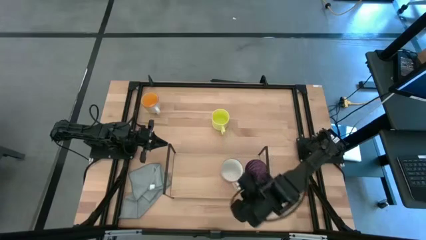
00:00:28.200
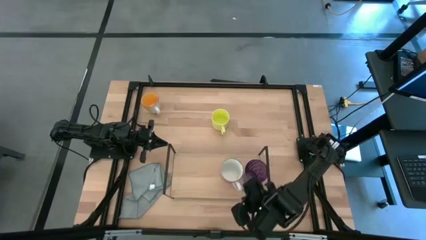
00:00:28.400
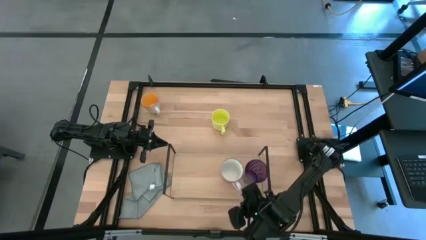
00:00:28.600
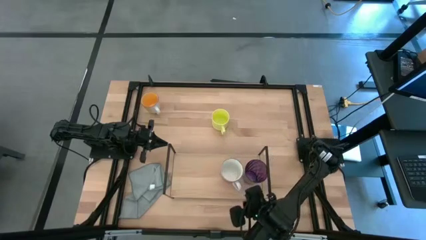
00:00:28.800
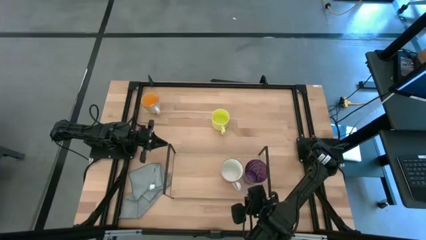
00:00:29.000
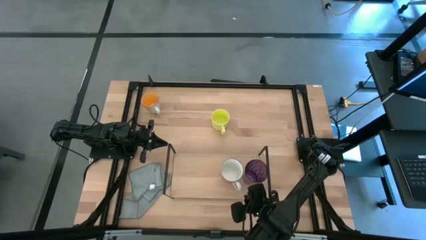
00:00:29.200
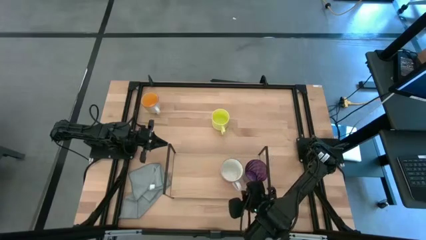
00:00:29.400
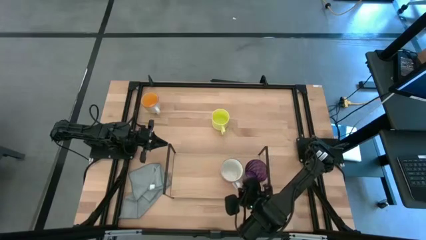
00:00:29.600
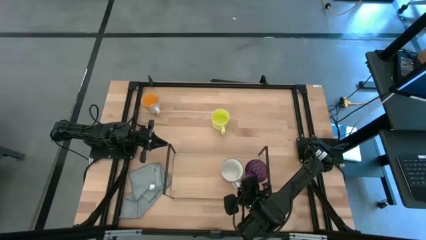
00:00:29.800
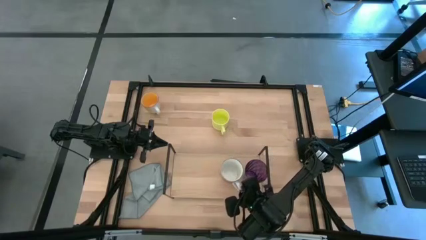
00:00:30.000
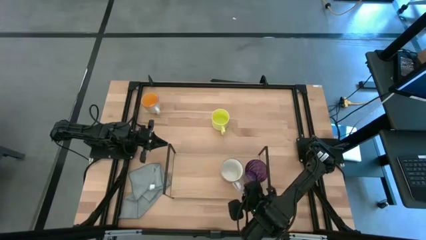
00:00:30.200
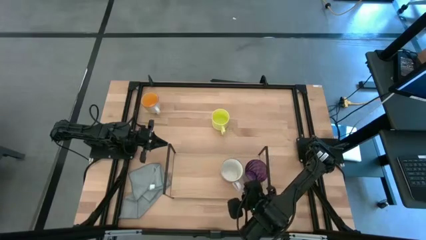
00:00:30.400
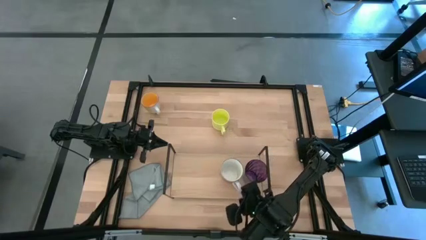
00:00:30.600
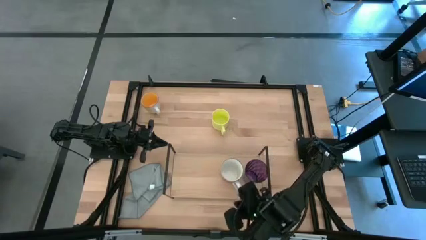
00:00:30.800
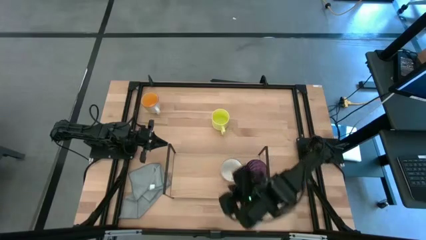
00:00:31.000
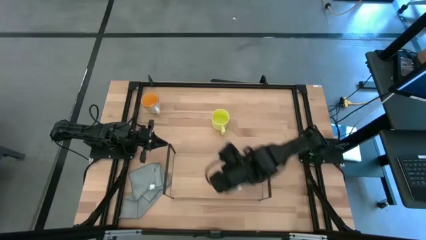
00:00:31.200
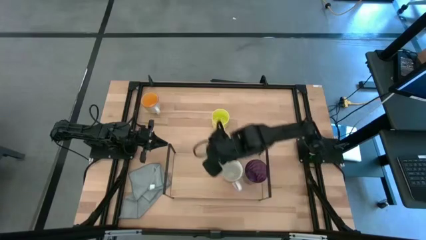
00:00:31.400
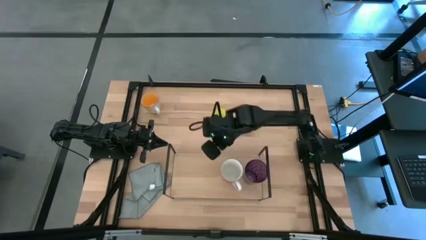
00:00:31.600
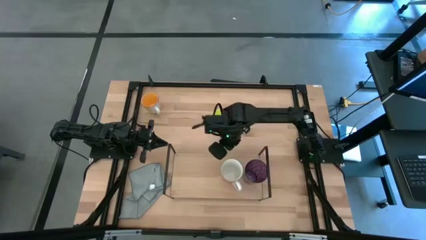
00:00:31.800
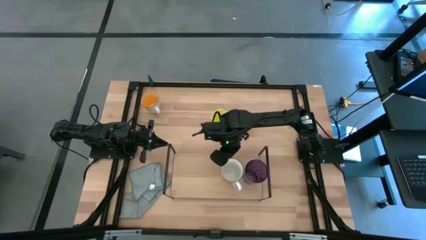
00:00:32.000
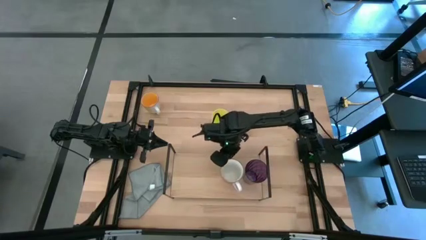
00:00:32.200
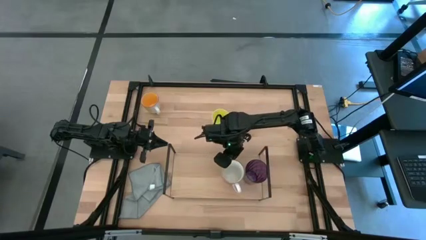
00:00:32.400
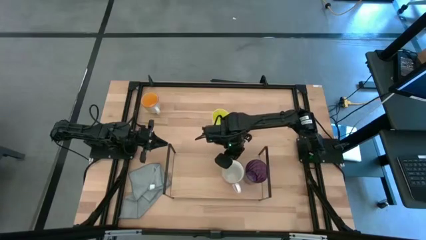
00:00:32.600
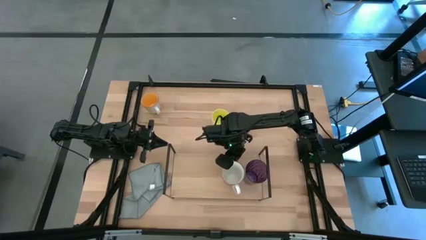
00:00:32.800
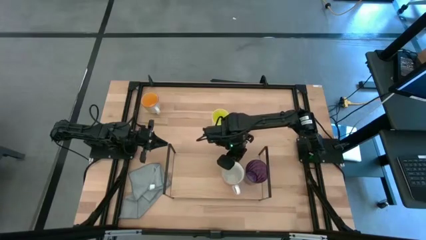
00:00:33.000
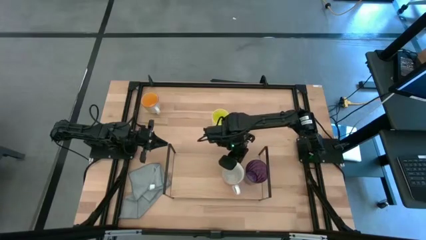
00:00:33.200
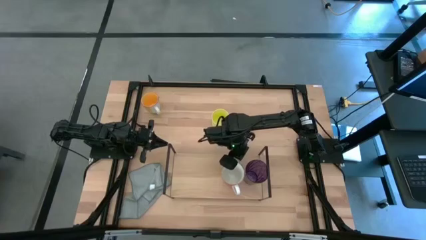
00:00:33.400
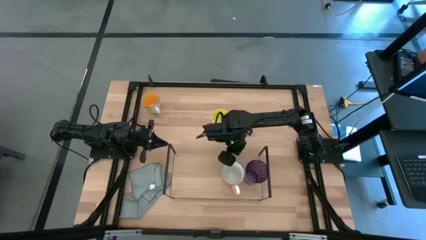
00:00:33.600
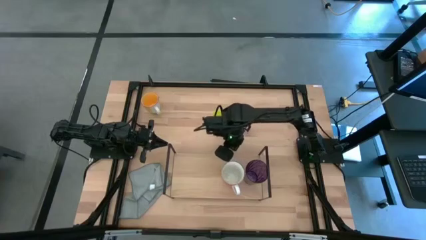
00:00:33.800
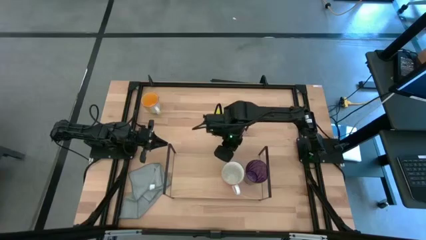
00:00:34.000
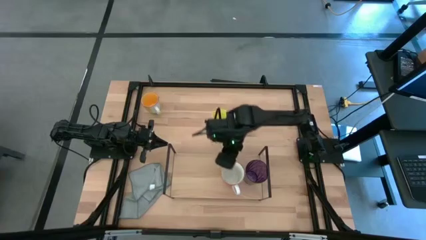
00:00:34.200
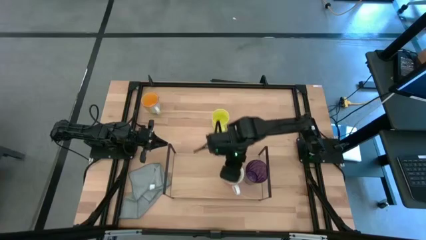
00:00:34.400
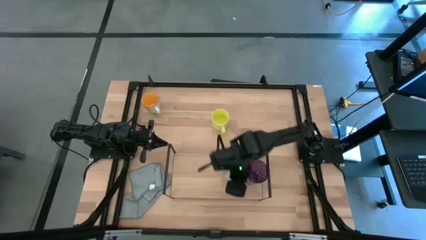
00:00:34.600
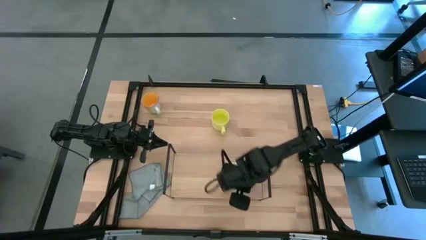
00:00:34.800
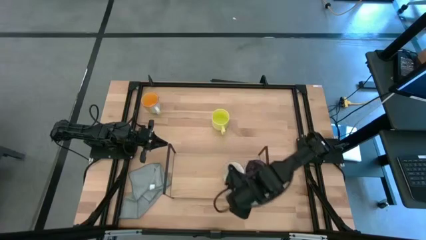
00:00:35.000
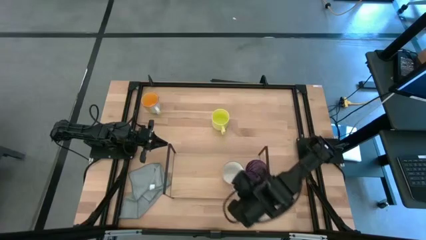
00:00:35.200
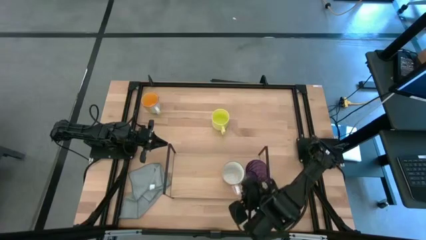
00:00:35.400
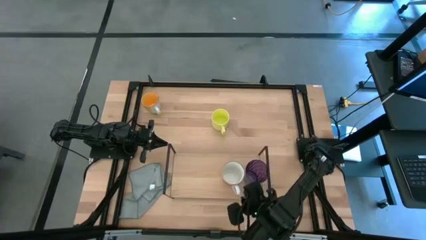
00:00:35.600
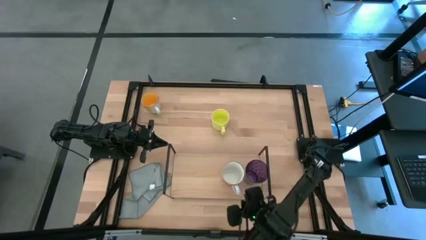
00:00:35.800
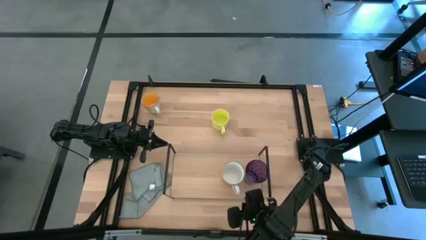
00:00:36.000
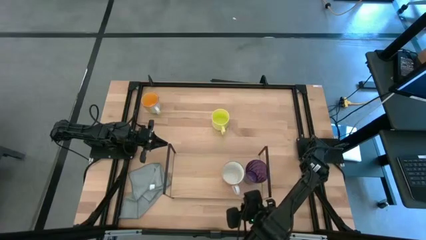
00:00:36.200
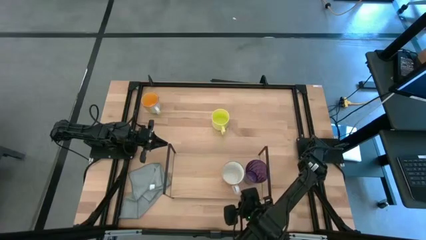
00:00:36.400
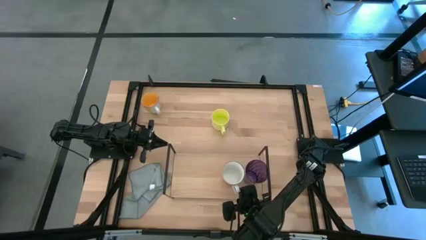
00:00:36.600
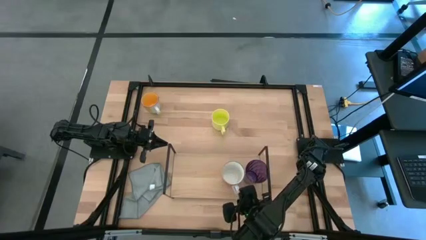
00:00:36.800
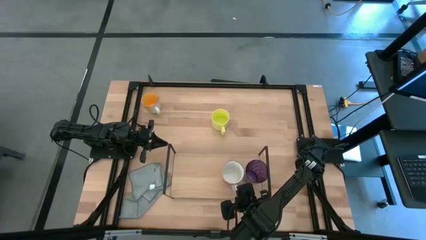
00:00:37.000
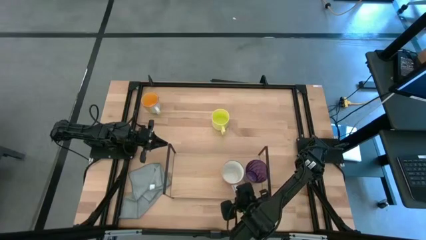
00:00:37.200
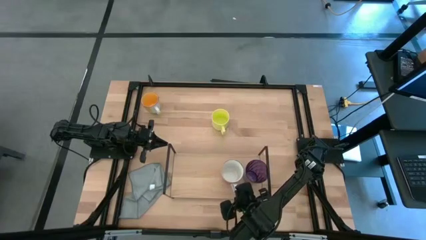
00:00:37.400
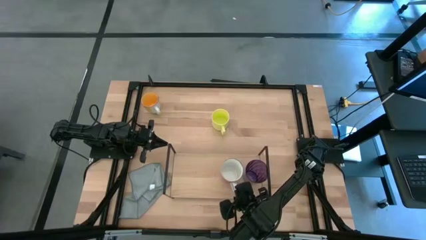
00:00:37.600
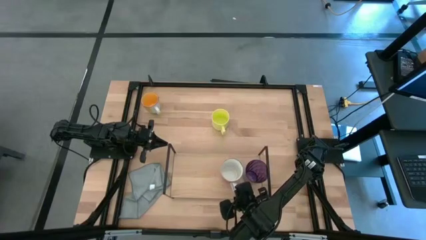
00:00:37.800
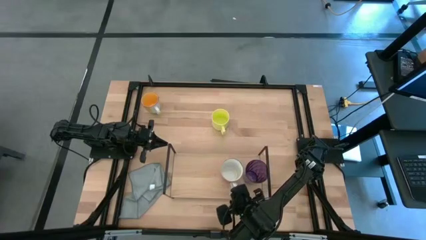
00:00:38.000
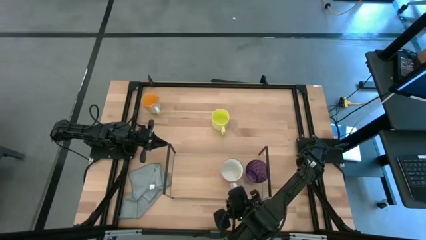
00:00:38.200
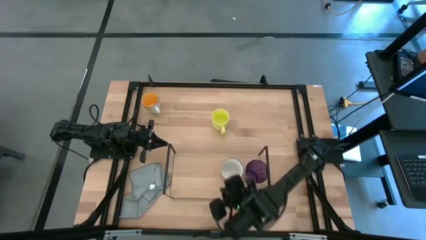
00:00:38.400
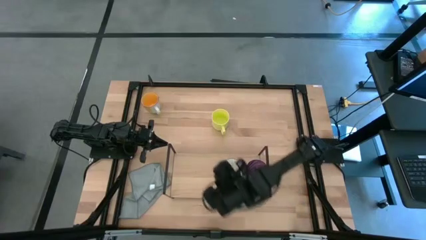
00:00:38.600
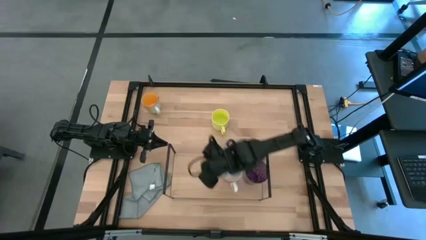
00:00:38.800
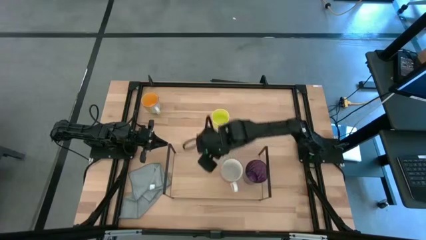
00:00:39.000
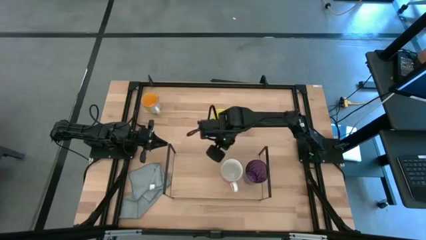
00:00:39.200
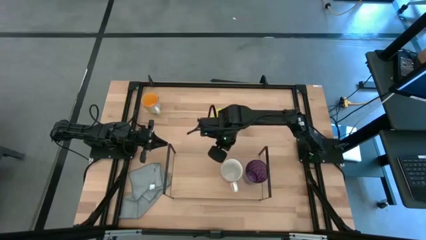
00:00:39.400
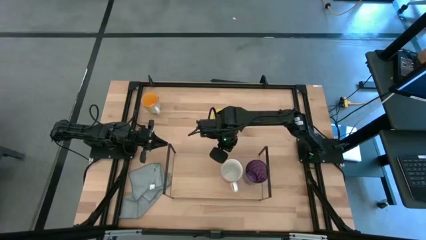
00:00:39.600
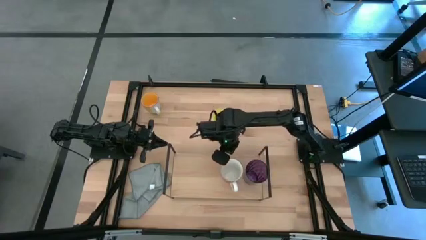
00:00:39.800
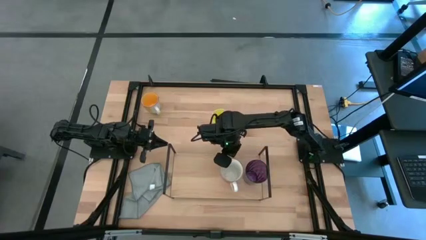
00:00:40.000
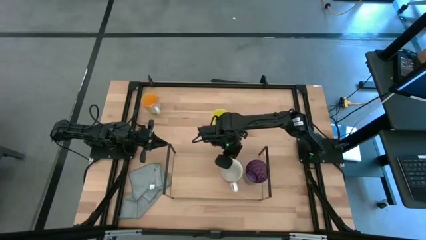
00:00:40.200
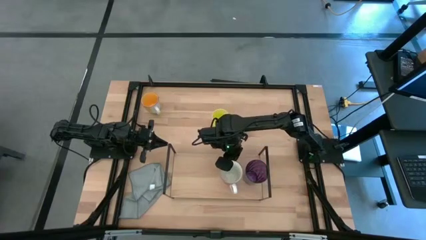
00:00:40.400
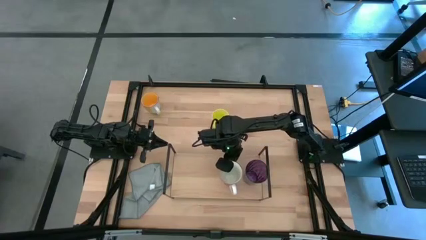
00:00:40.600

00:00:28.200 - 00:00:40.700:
Task: Stack small to large cups/mugs on shelf
Put the orange mug on the shelf

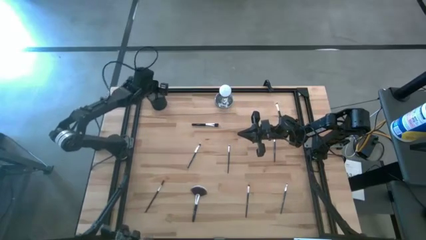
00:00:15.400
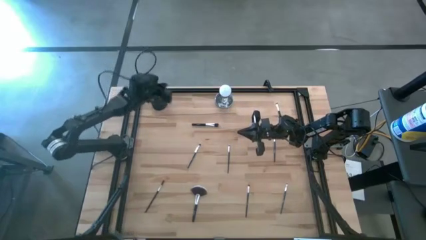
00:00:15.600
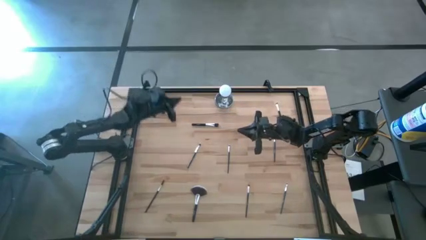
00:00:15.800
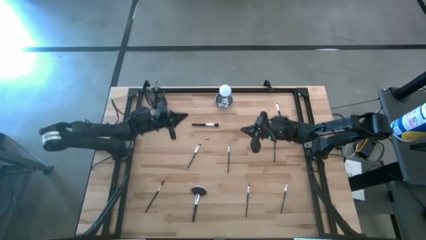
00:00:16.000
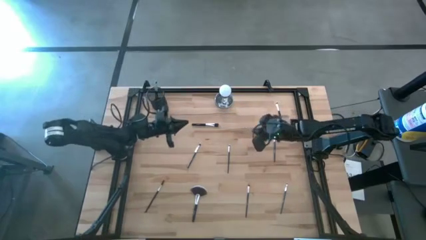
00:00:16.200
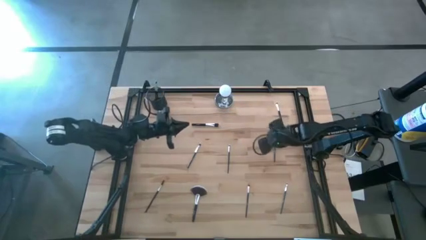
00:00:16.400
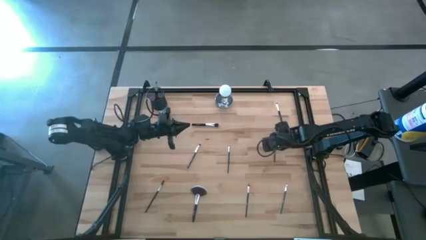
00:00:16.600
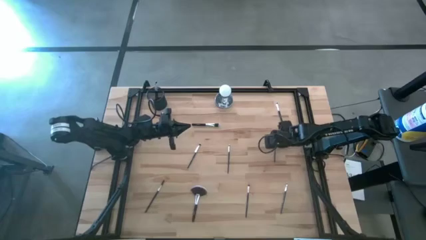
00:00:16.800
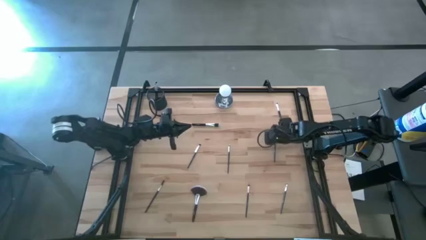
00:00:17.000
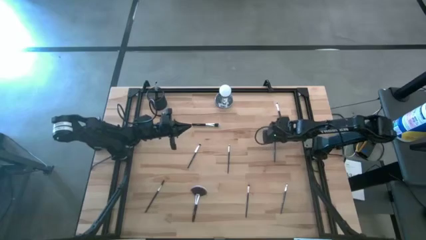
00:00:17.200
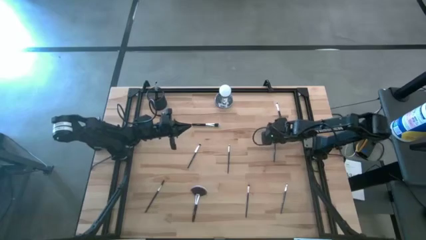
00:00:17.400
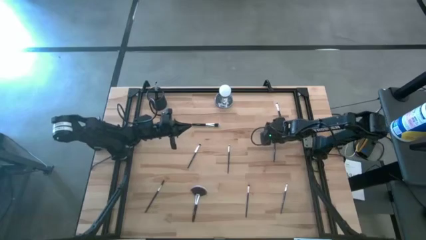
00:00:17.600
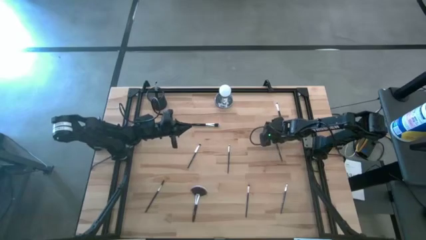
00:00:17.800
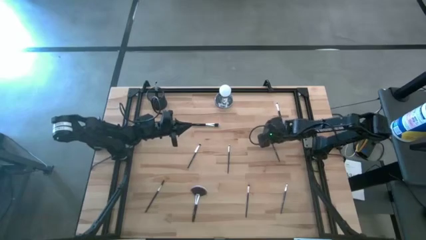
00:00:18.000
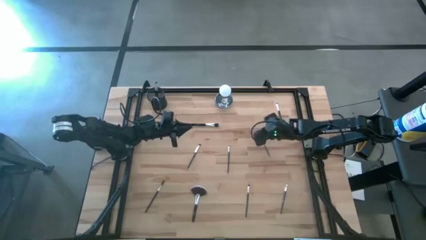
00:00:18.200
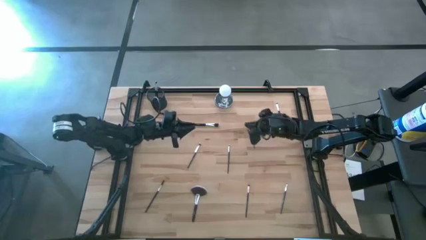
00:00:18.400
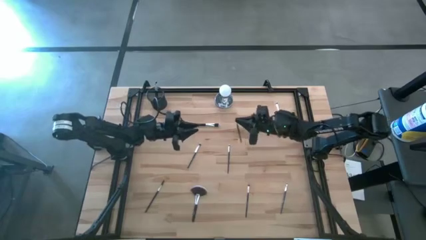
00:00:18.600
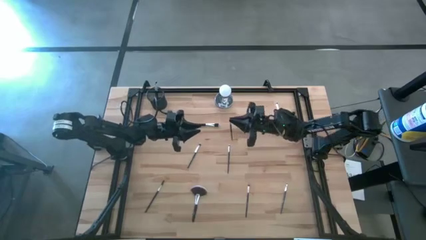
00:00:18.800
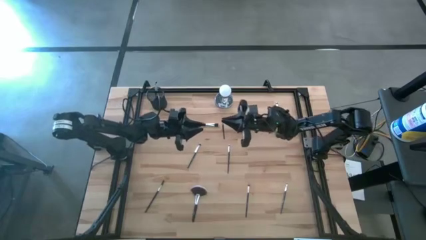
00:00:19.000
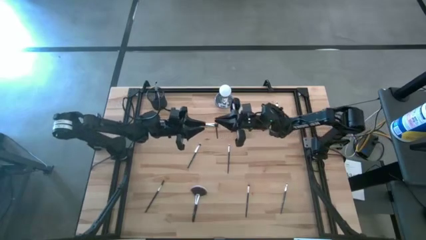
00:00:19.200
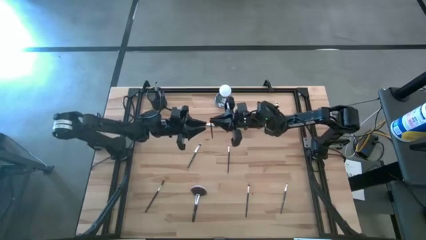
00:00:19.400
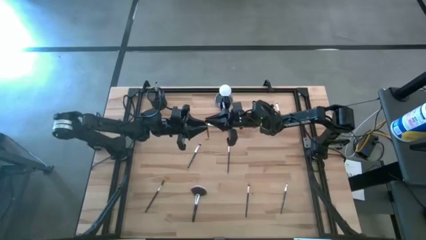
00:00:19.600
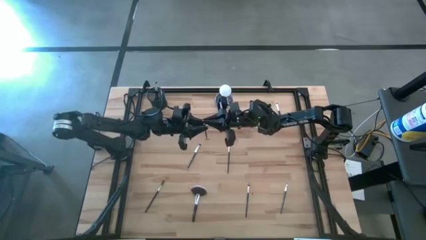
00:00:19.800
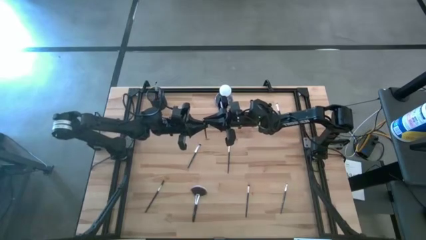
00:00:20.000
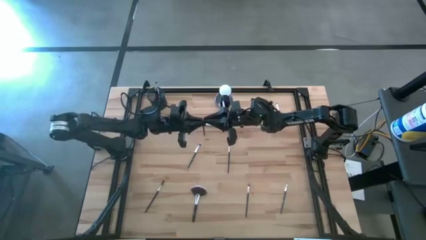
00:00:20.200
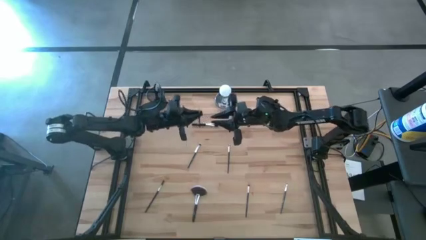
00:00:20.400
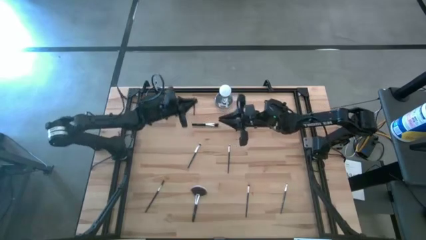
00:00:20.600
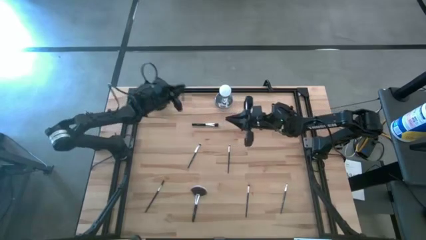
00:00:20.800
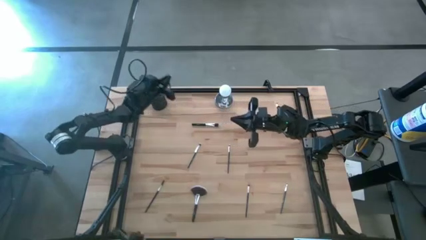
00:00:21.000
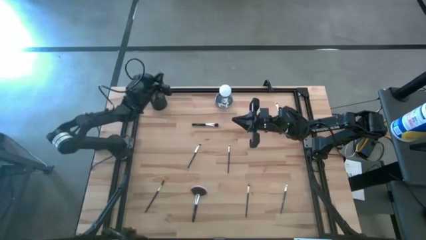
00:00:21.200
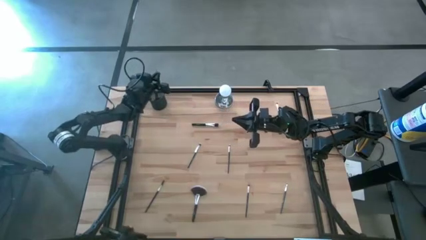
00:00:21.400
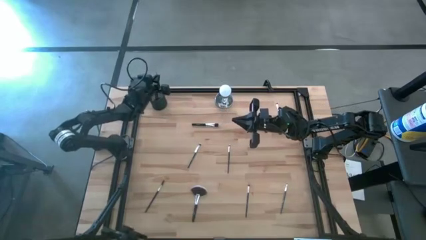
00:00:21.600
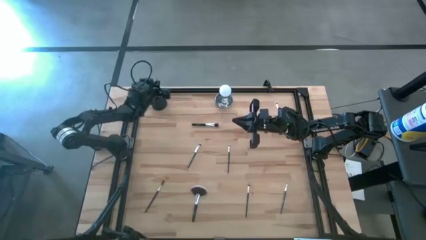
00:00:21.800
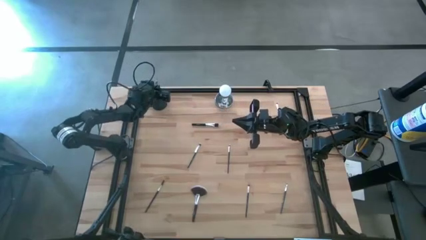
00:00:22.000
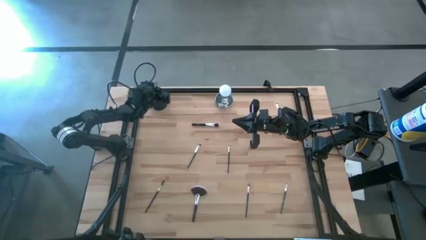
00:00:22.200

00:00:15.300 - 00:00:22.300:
Task: Put items in baskets/containers
Put the black eyeliner brush into the black brush holder
